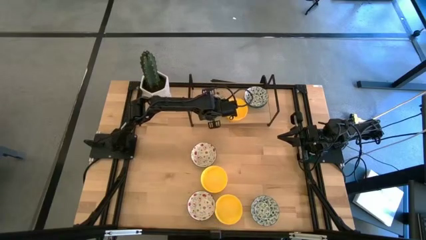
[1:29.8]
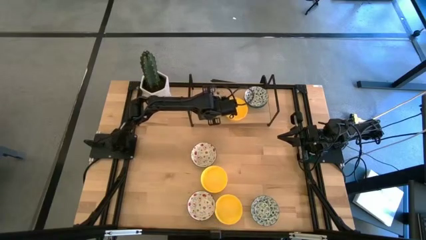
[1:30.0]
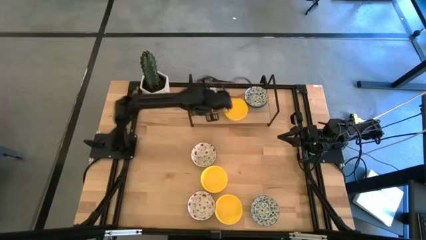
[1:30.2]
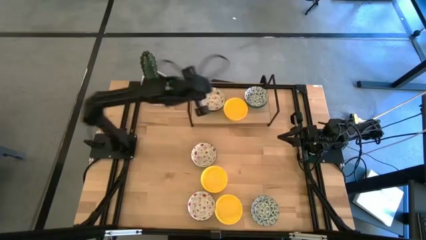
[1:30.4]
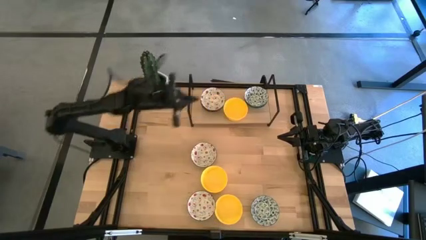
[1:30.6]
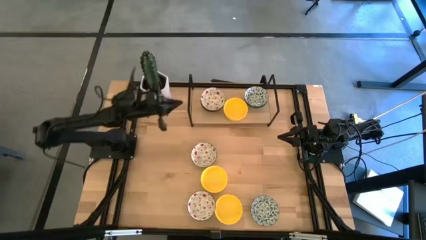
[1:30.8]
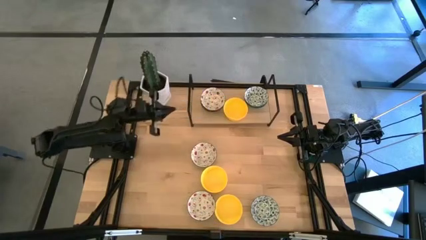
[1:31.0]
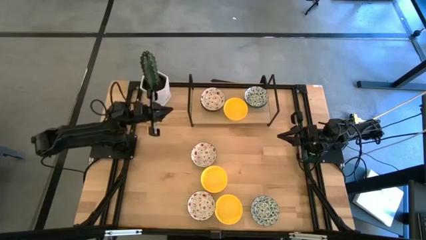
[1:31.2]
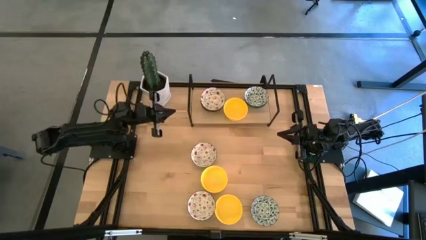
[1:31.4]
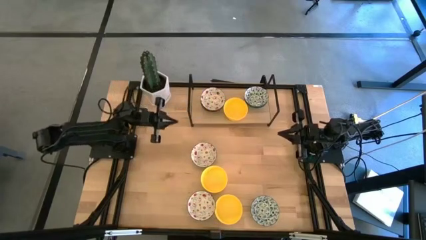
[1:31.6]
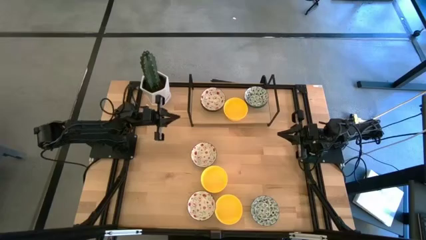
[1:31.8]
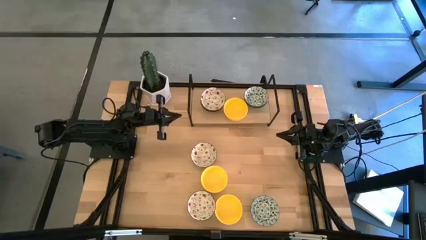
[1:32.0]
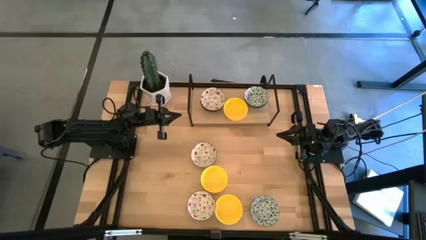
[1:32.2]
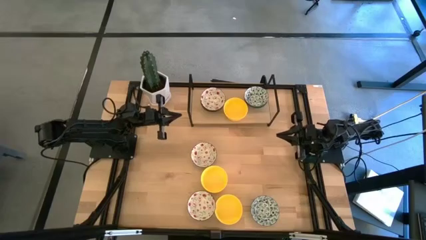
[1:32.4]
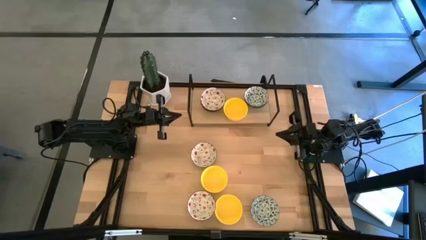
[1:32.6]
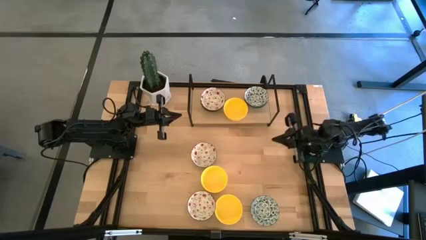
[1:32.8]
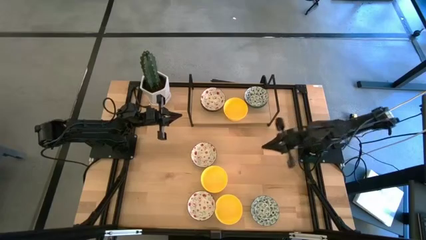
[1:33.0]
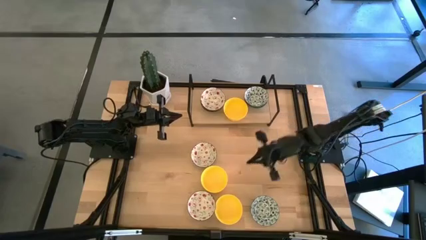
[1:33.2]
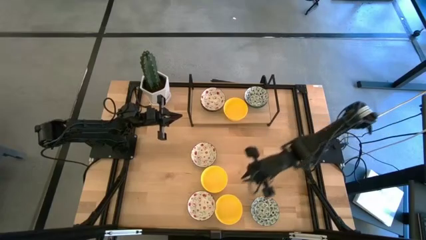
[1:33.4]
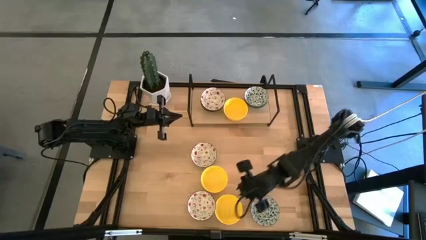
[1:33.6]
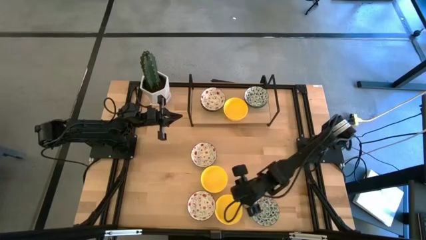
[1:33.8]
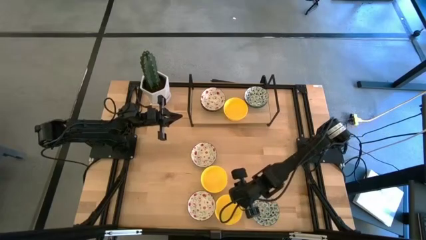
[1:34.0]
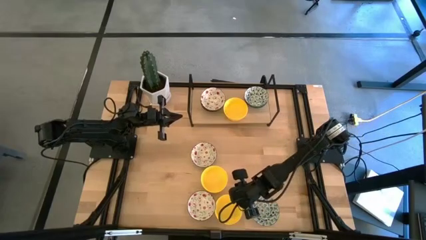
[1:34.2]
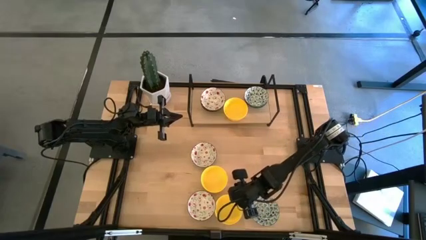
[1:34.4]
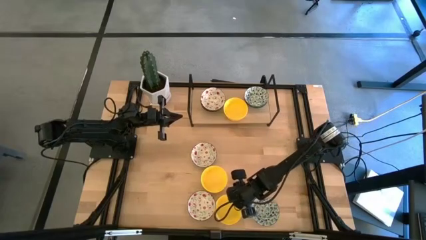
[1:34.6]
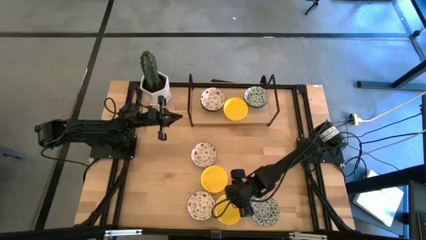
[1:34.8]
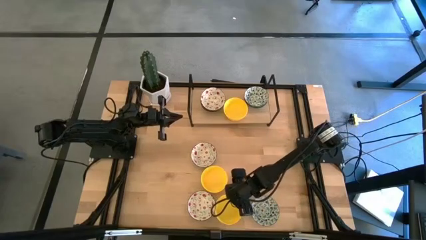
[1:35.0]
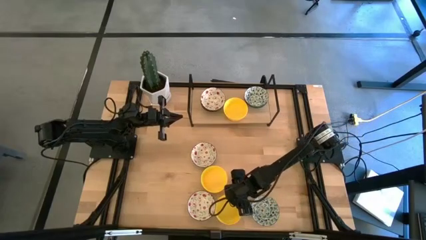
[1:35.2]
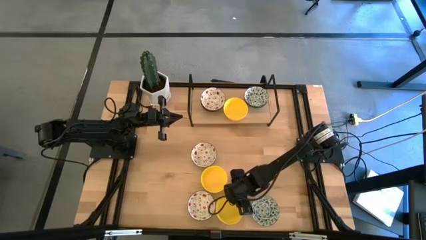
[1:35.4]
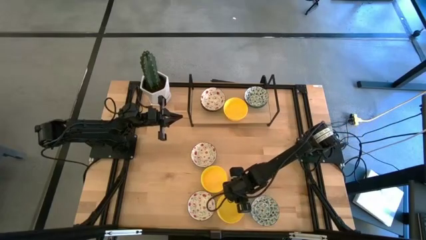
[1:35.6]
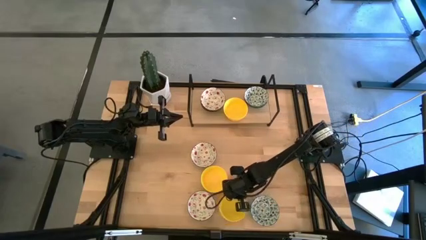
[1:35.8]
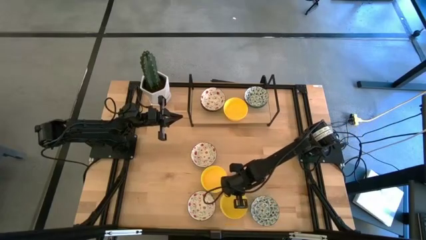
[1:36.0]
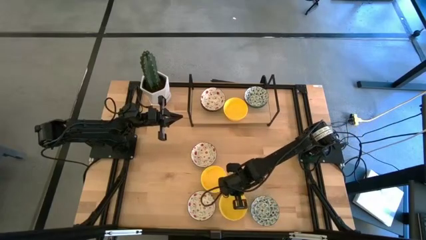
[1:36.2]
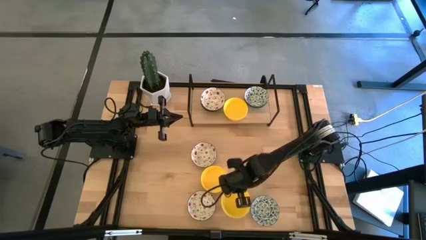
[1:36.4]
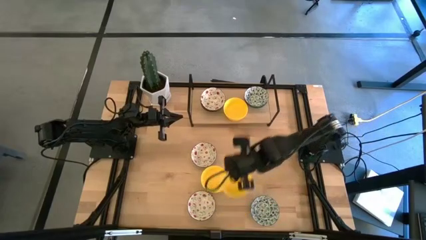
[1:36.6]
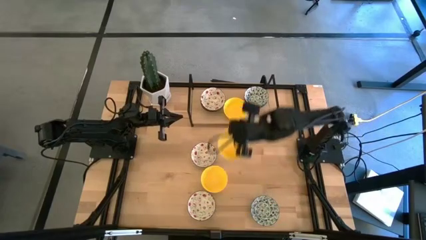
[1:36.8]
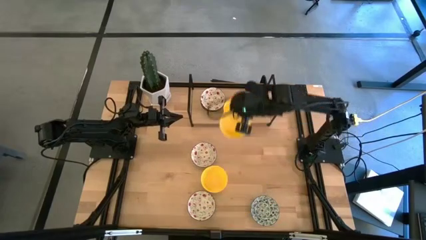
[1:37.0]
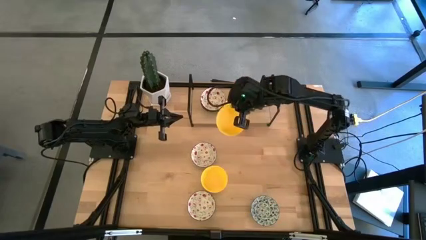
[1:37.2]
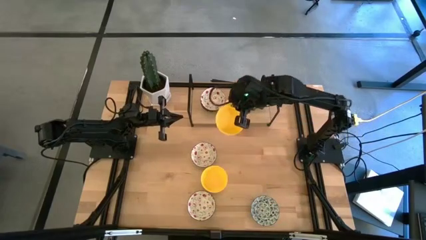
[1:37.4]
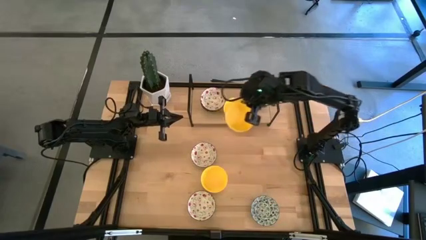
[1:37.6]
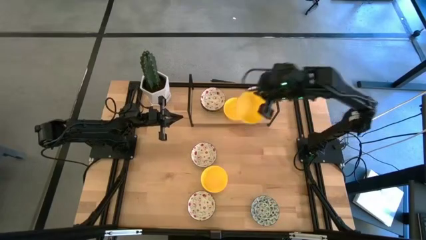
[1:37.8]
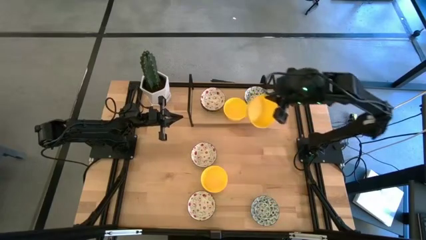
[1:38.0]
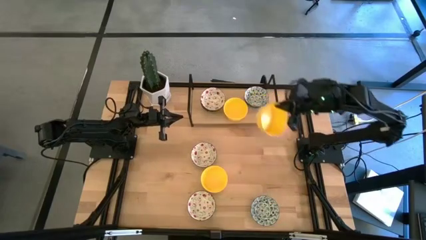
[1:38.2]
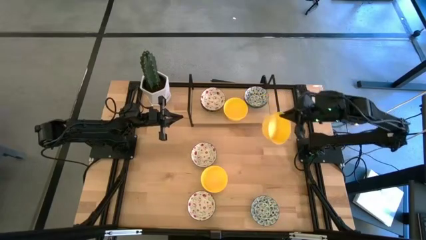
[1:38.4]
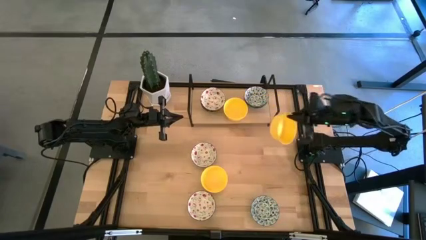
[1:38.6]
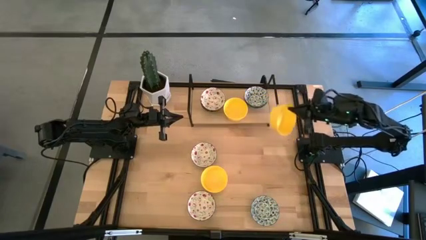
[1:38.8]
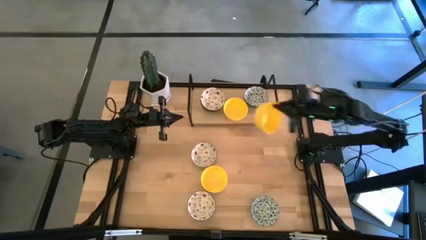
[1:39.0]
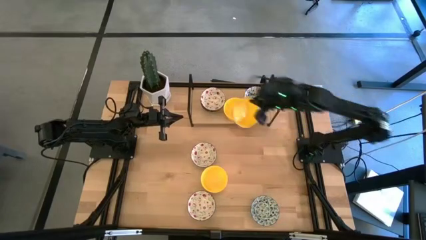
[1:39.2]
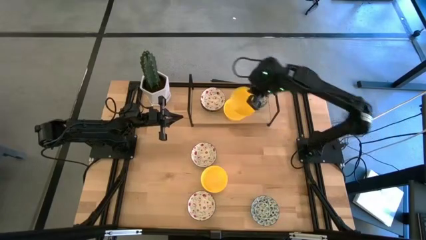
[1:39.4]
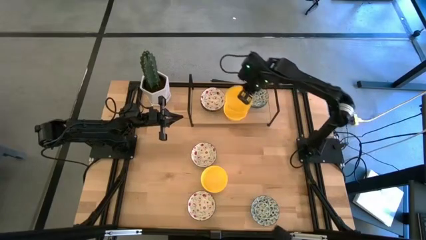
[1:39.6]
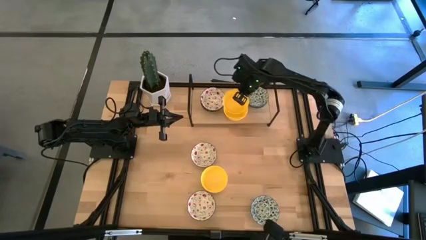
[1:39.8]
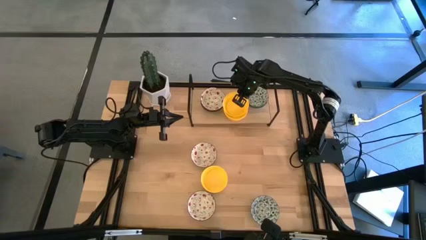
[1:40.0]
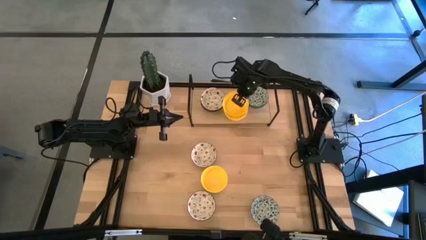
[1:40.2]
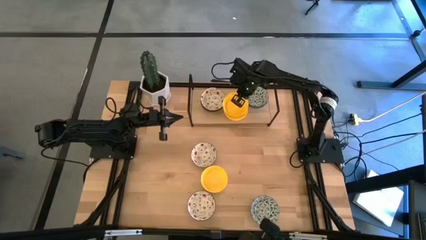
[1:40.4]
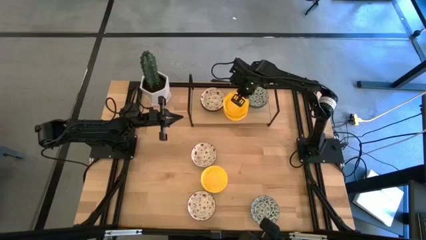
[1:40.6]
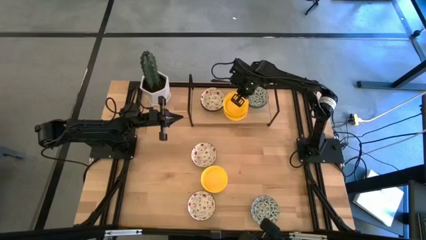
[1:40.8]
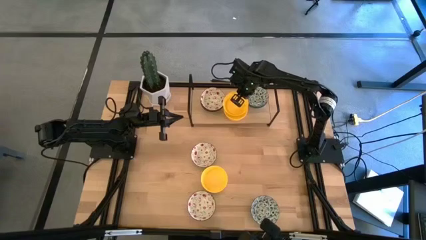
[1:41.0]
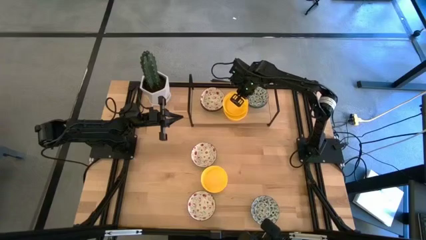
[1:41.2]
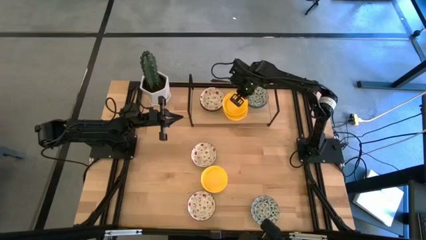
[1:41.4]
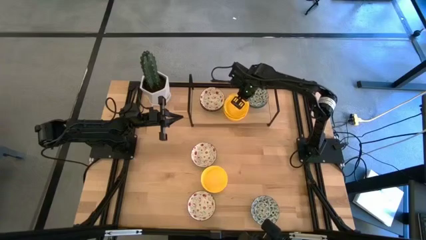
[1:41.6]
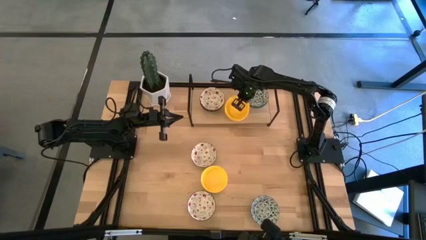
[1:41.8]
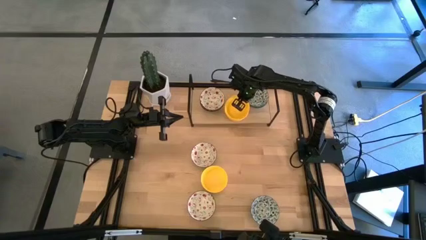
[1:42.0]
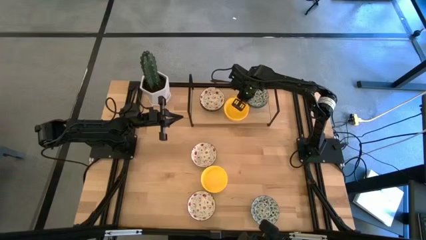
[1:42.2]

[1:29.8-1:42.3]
Task: Pick & Place Mini bowls
Stack the yellow bowl on top of the yellow bowl on the shelf
